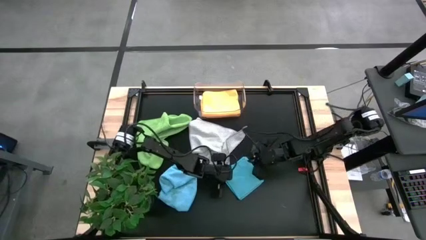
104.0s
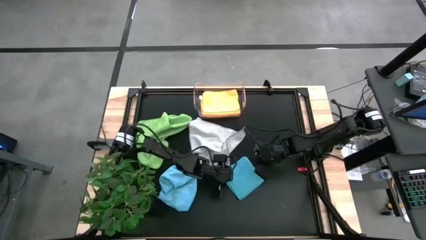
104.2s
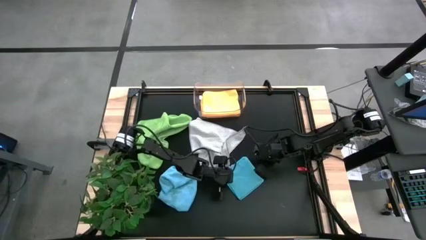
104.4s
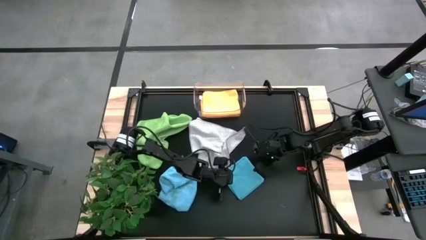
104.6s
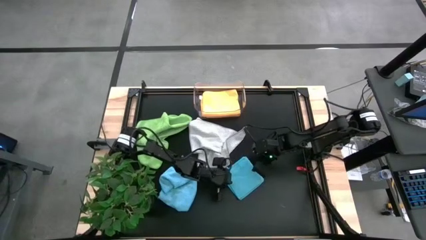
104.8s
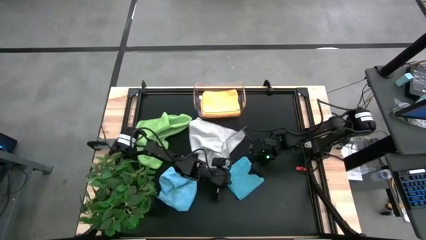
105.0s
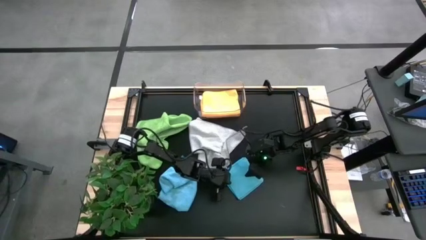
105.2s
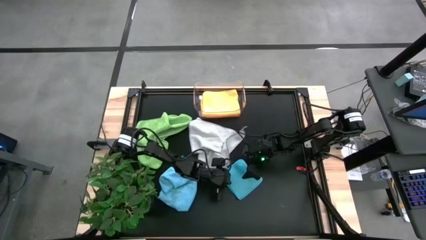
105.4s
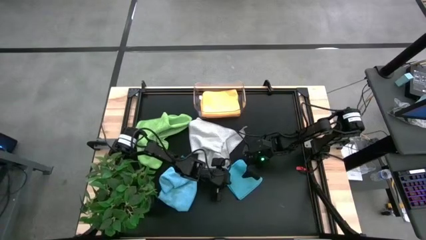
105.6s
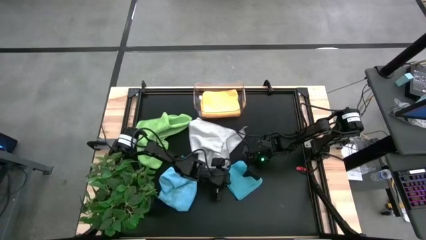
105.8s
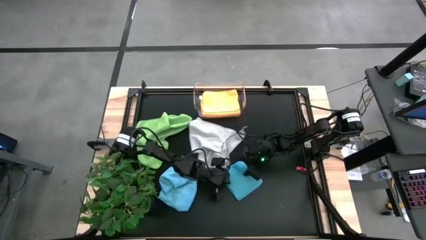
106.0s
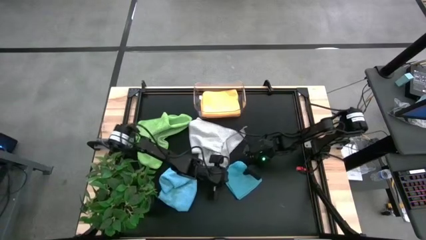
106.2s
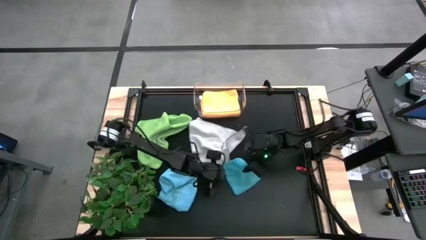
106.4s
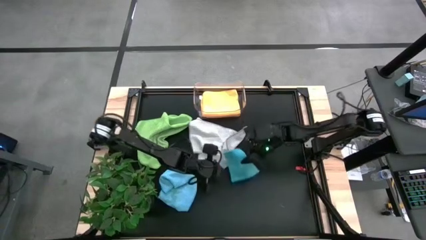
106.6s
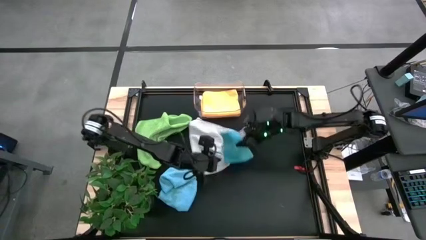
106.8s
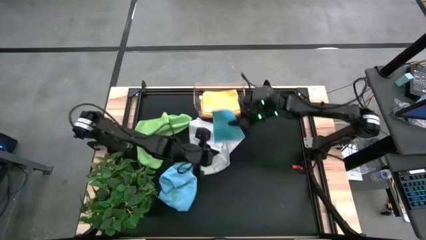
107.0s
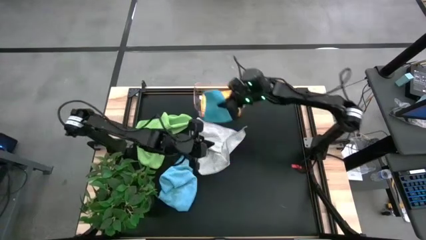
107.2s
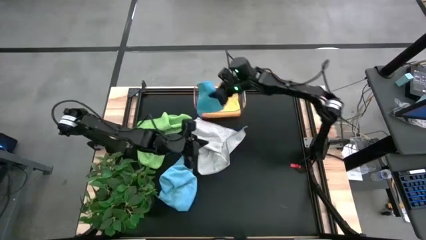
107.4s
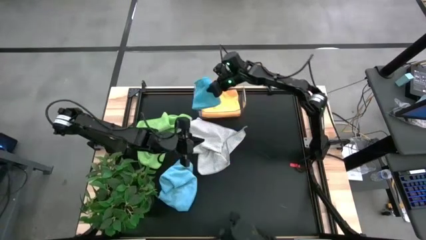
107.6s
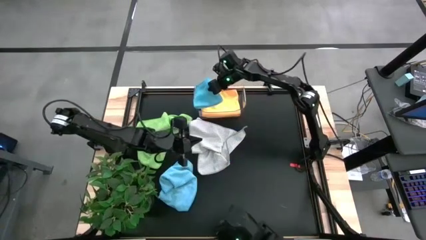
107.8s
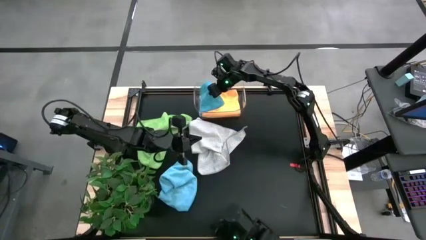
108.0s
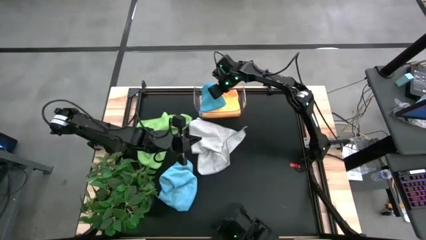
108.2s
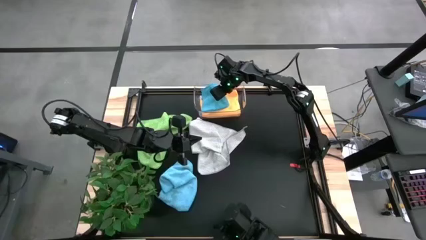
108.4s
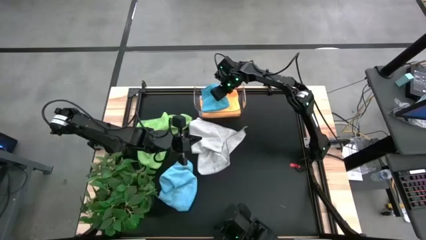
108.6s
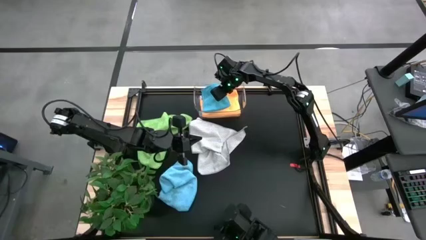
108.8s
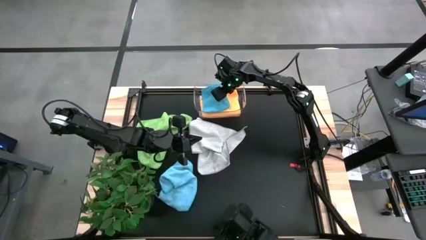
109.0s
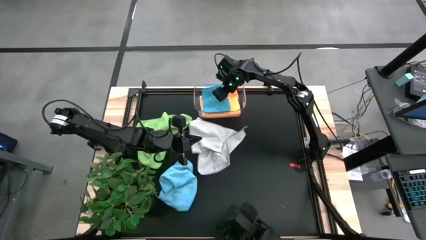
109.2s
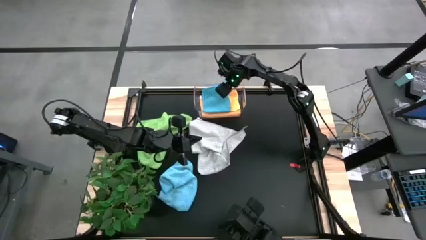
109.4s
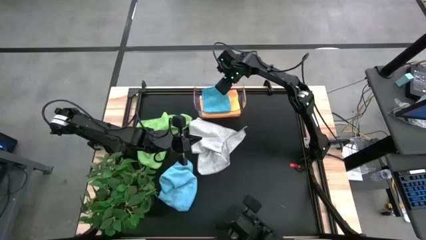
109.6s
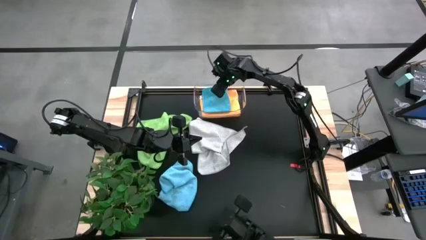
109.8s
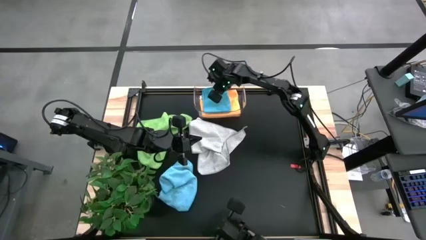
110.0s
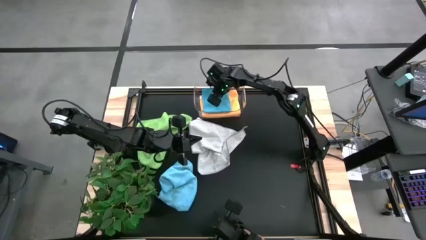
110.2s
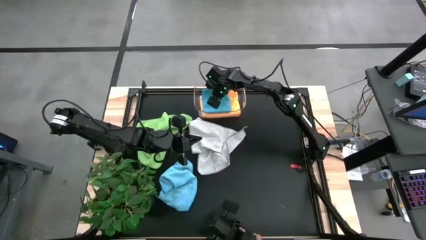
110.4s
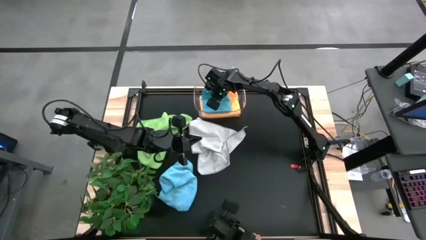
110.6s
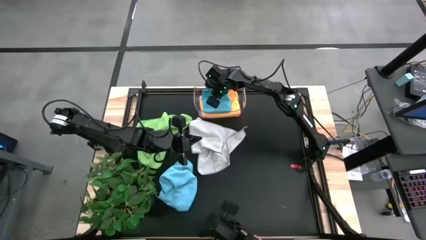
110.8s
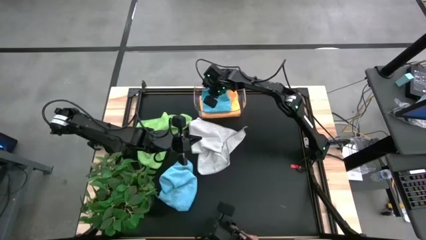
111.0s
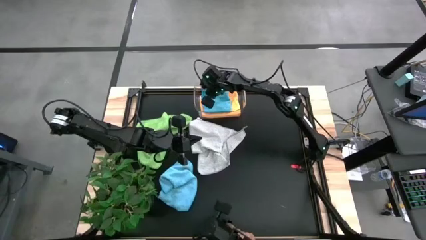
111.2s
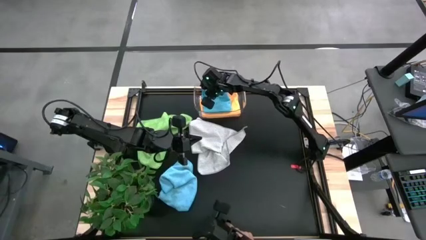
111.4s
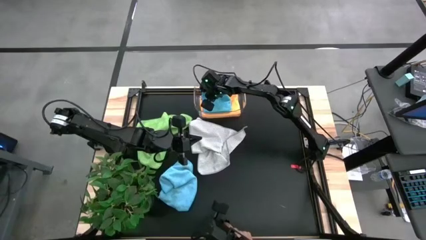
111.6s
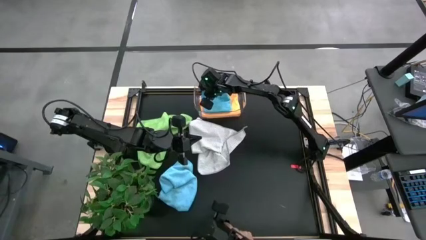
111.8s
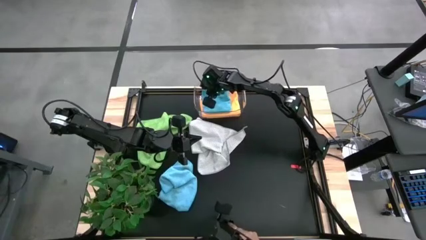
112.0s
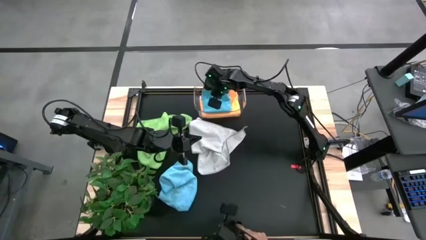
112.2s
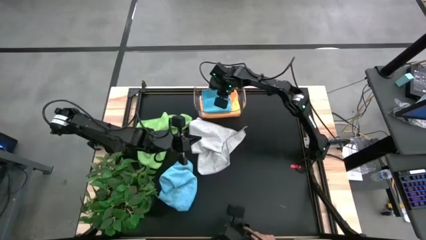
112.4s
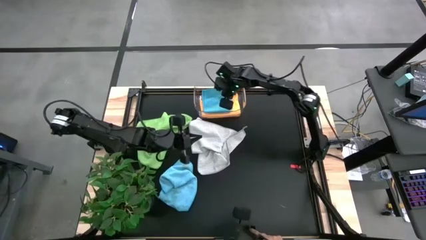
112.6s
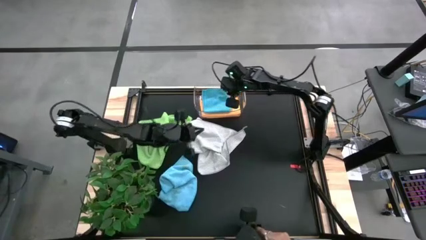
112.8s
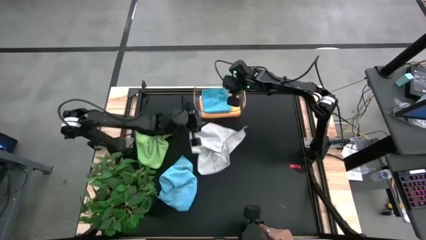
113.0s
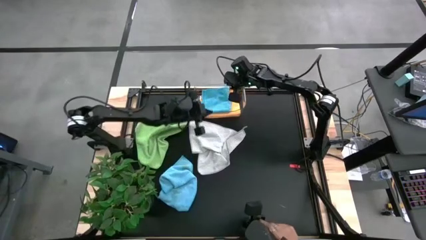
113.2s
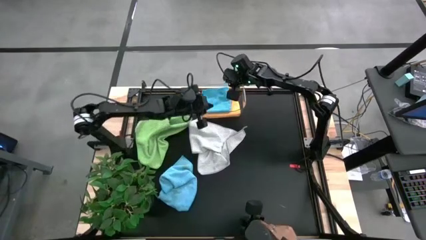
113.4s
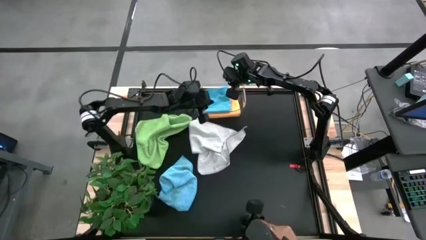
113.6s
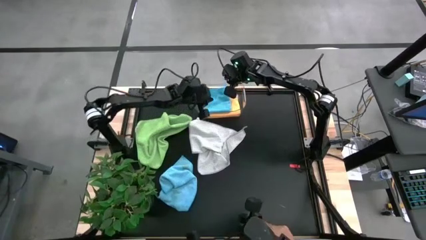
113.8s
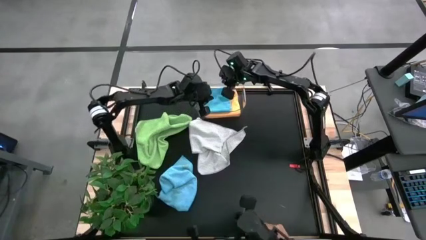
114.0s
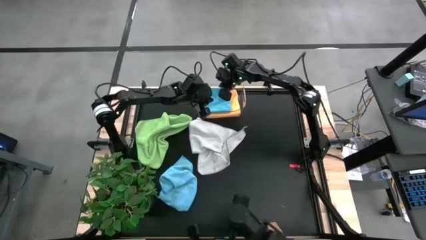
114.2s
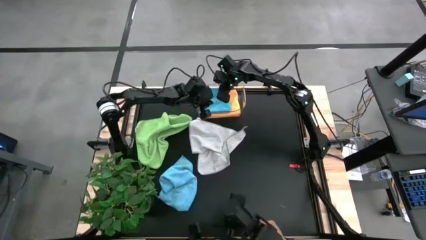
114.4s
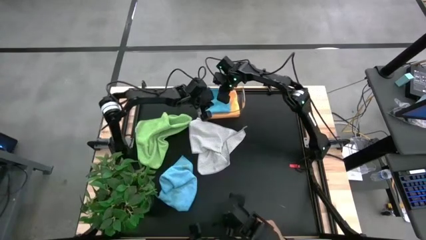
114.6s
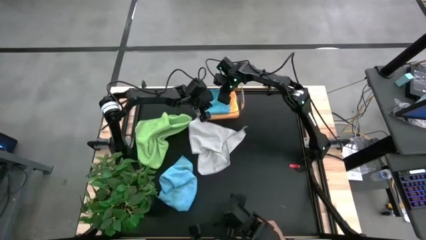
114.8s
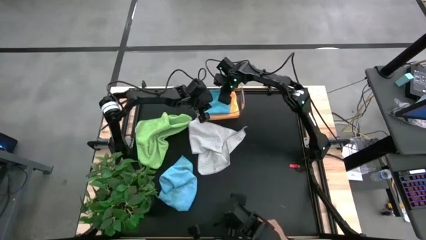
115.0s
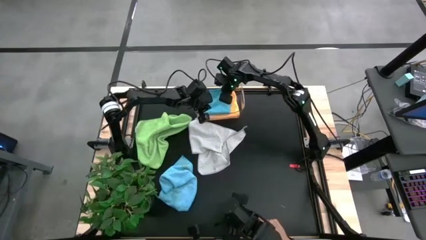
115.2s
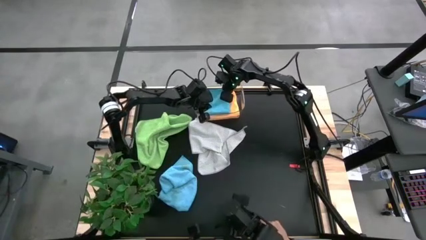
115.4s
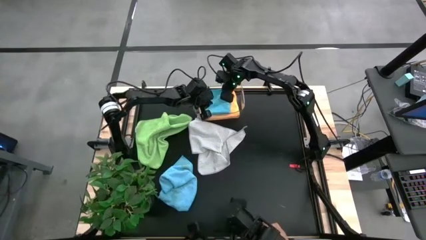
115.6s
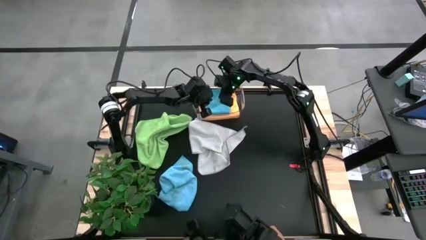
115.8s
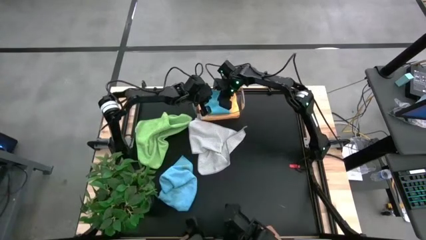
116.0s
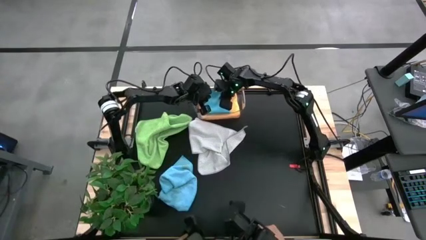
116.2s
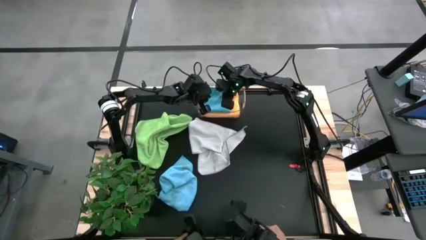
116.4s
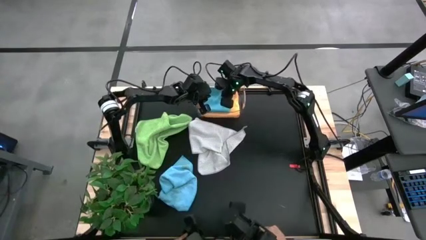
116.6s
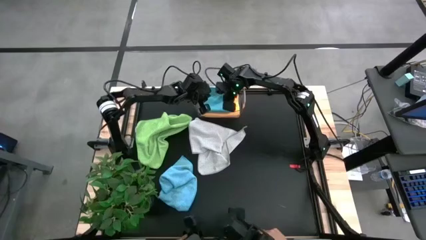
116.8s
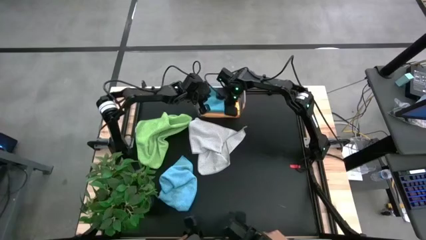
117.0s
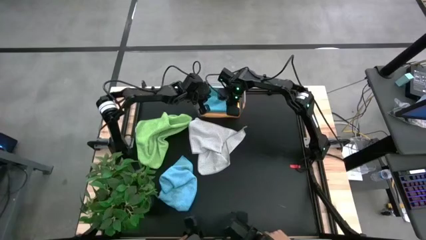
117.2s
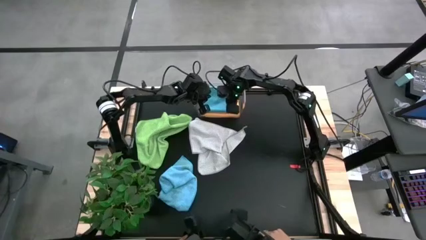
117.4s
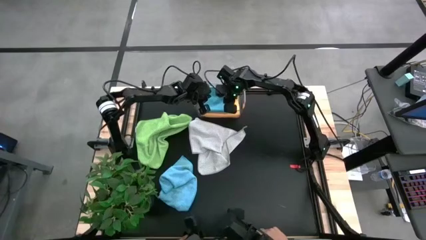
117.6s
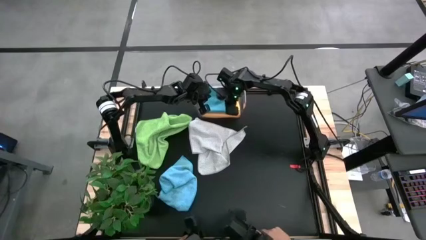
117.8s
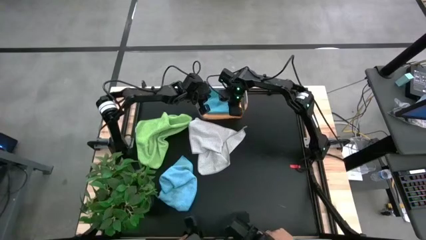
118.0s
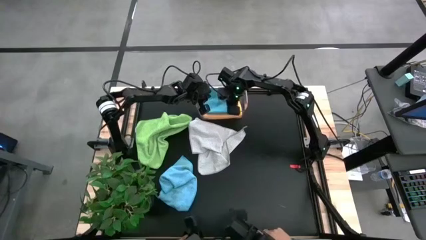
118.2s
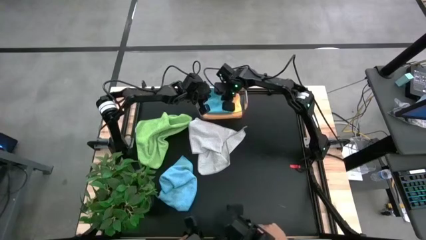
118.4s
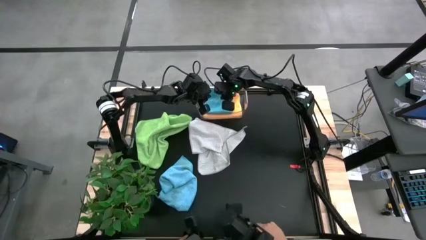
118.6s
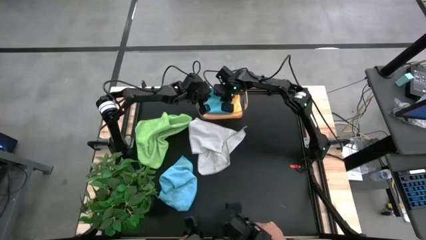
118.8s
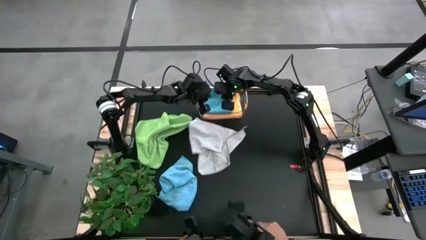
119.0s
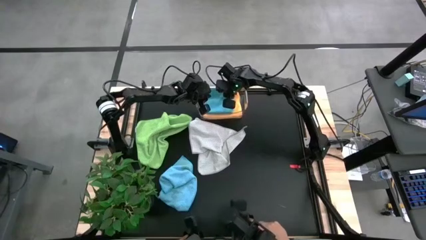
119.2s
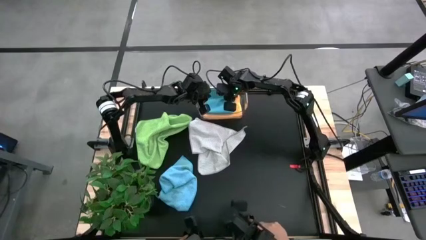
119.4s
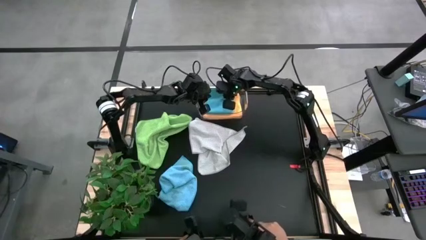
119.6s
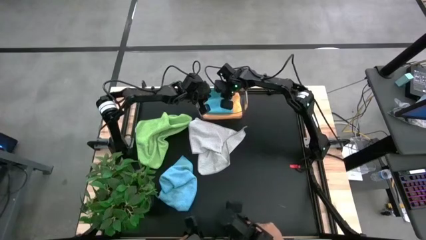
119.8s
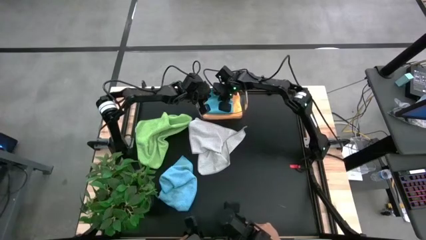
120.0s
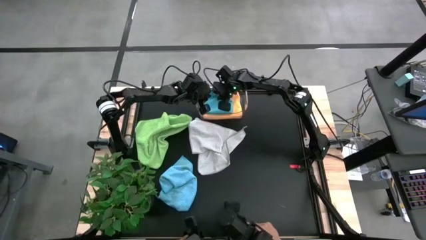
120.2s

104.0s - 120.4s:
Task: Fold microfiber towels
Put the right blue microfiber cloth into the transparent bin
